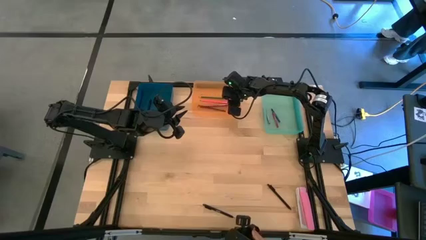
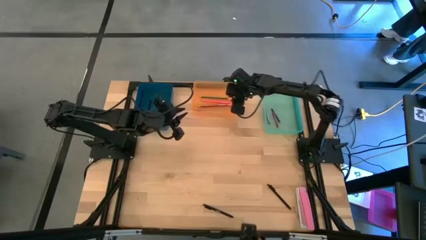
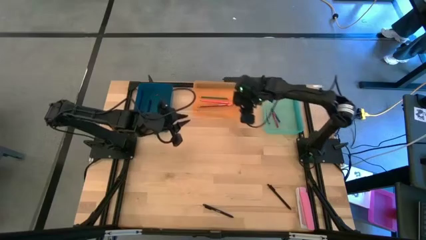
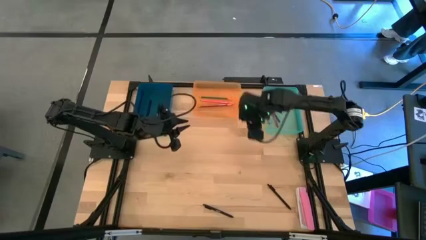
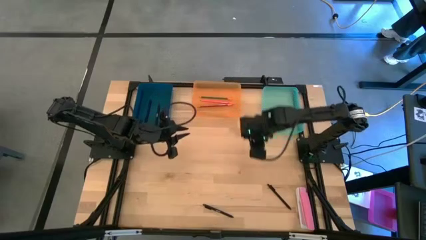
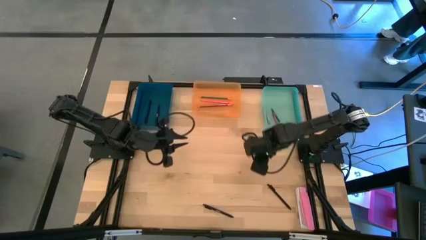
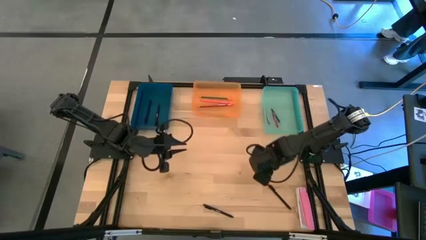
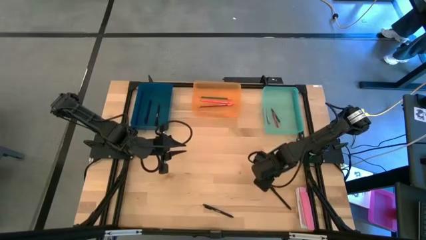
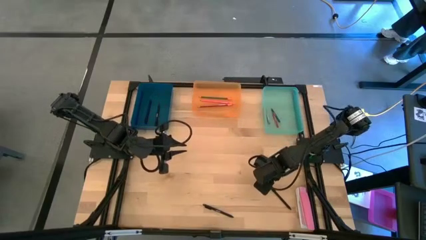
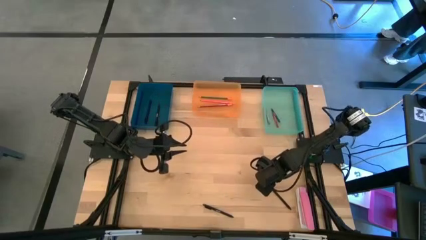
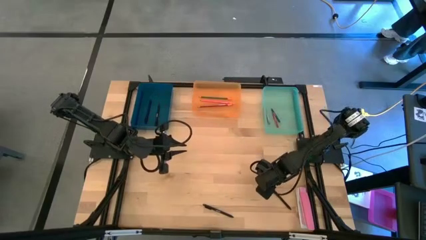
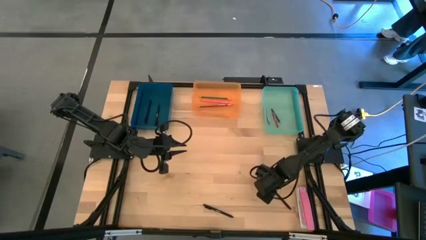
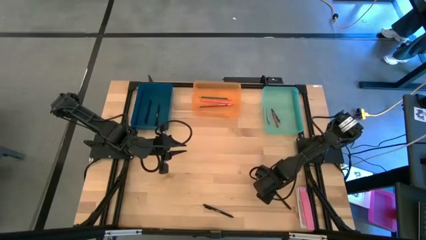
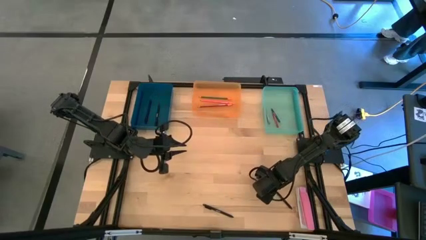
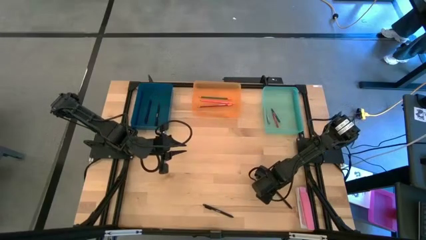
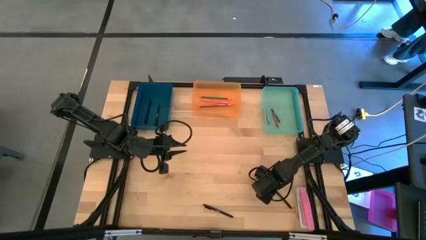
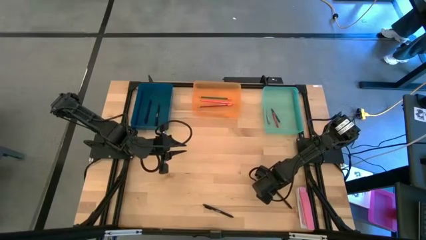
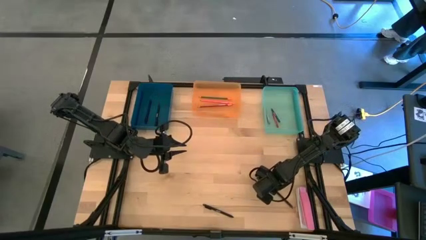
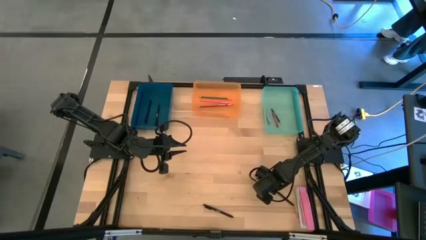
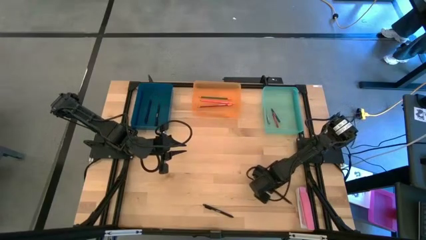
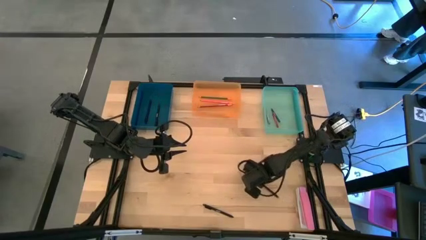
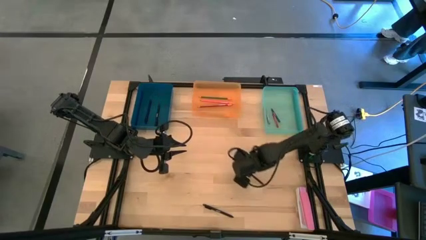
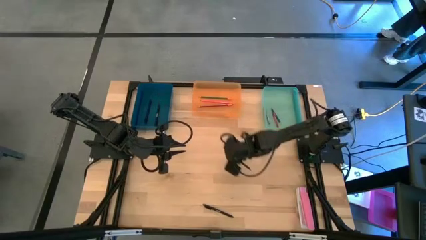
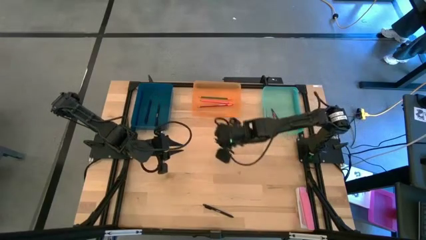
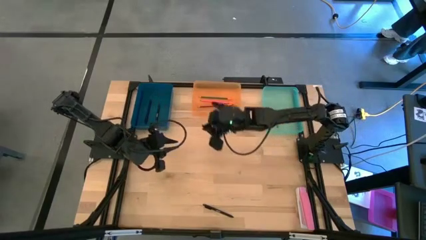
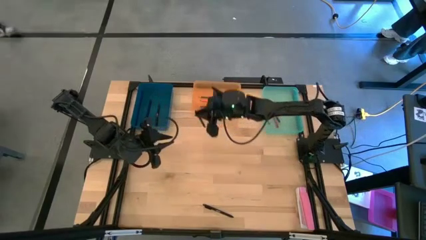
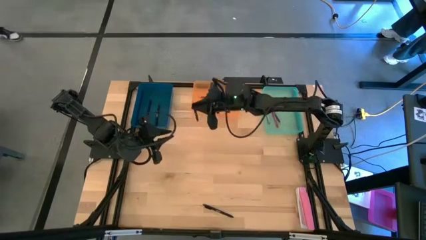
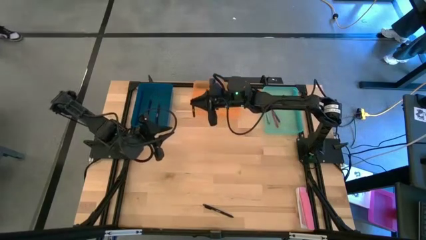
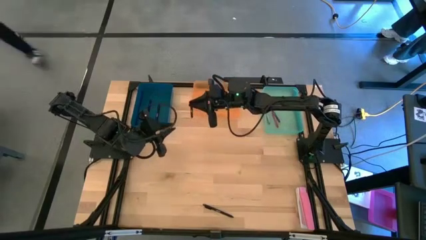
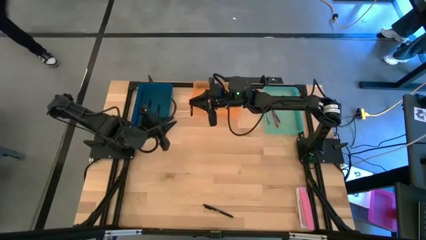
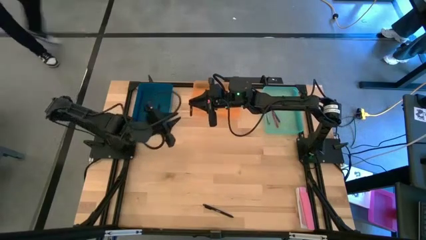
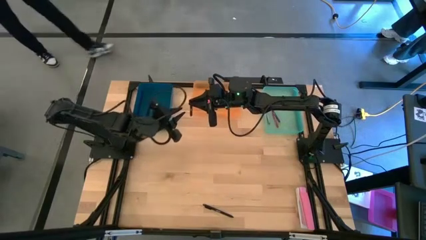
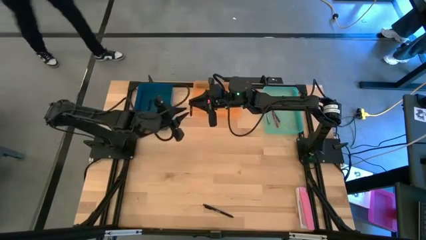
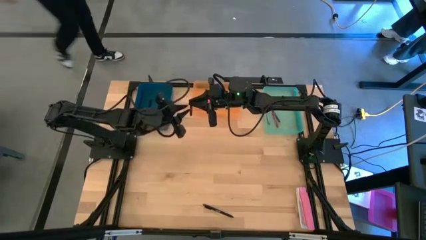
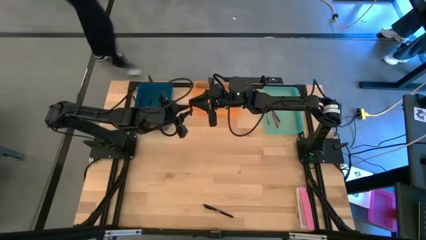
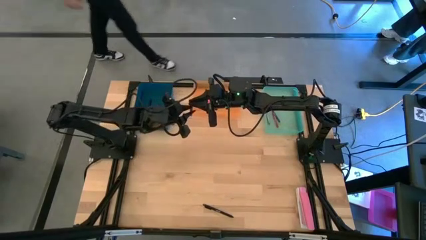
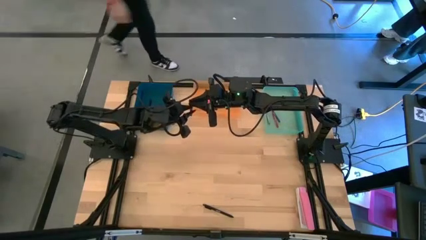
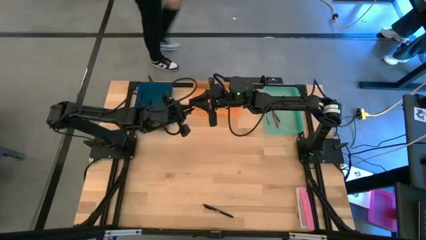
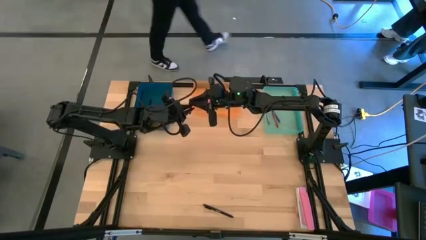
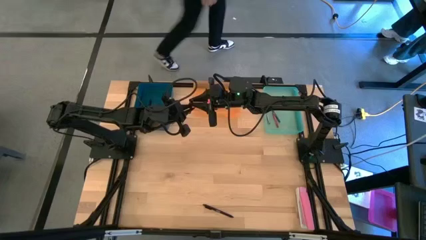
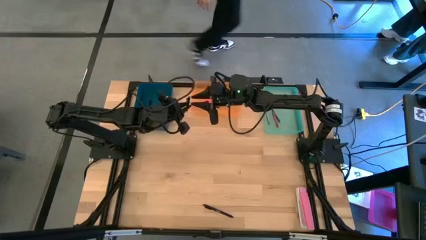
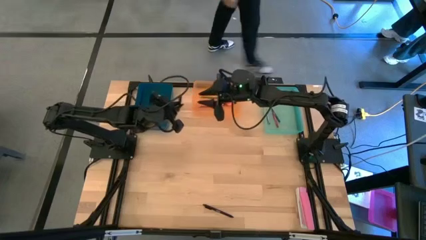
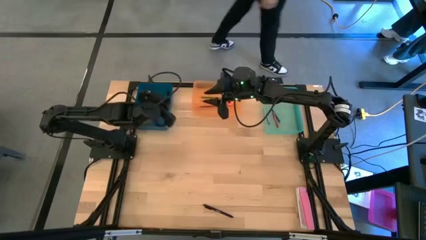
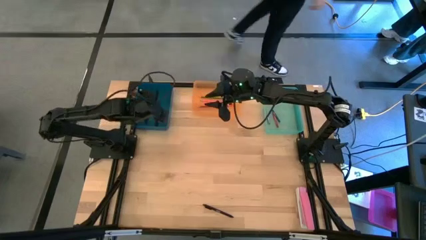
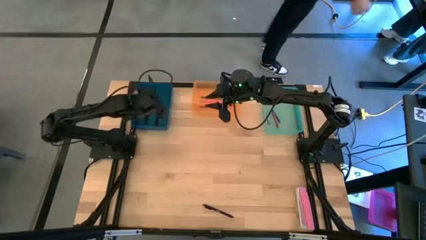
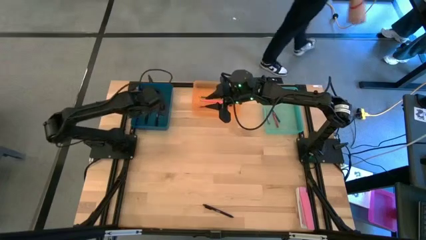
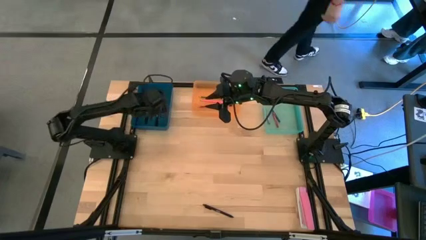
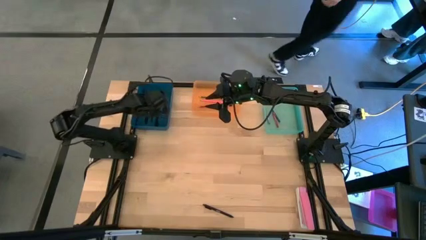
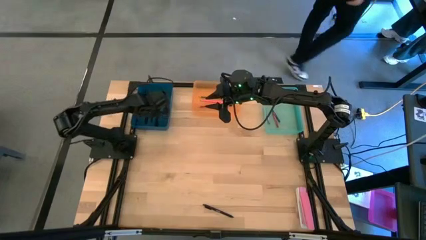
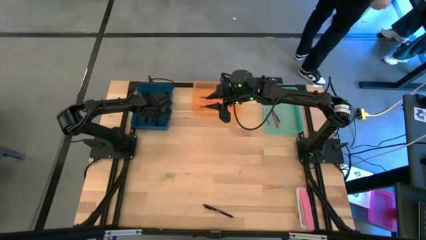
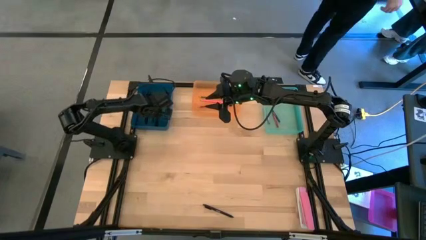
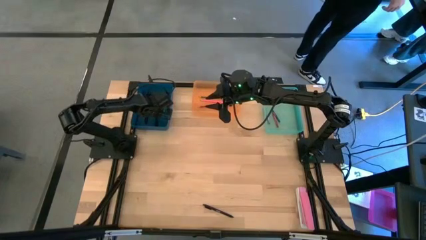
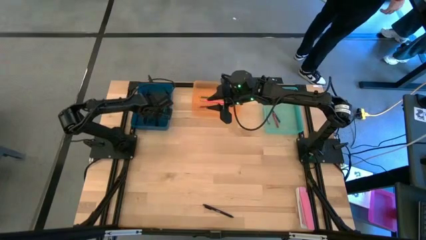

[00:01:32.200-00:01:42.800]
Task: Sort crayons/erasers/pens/pencils in bins
Put the black pen into the blue bin

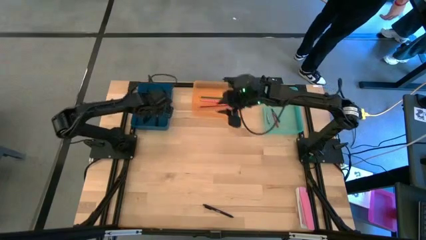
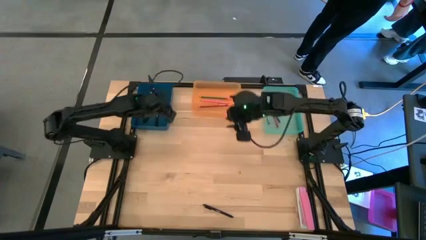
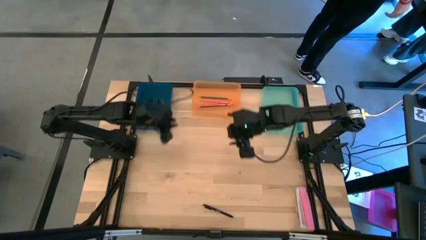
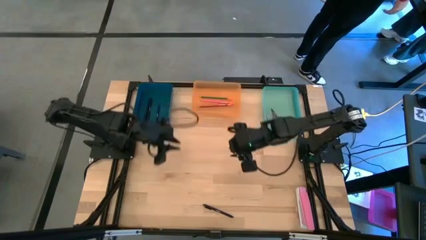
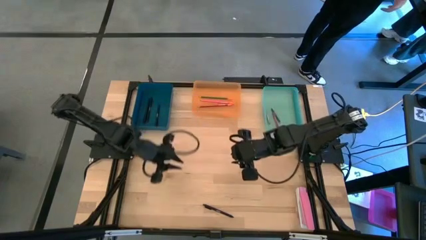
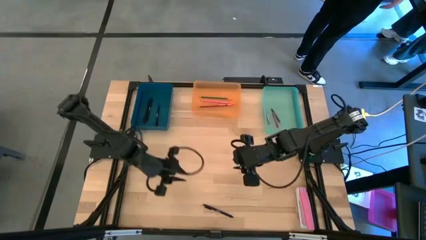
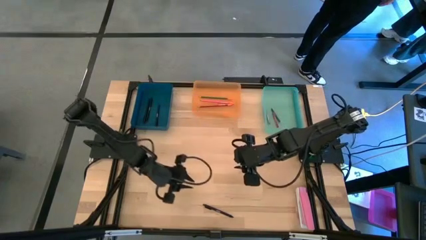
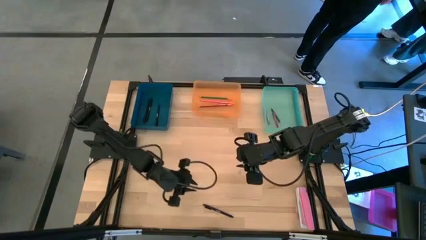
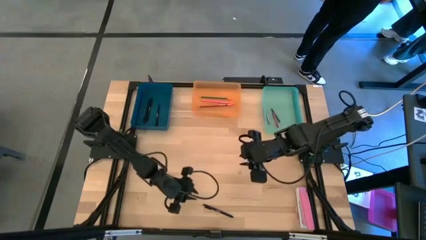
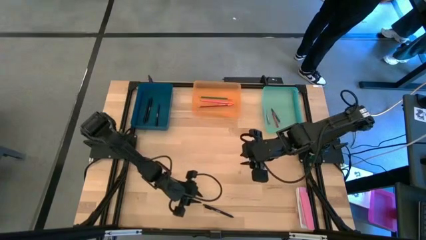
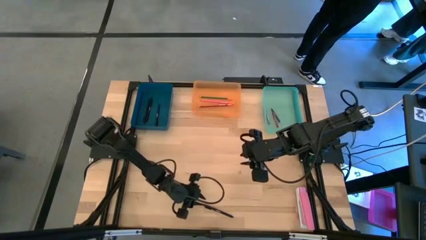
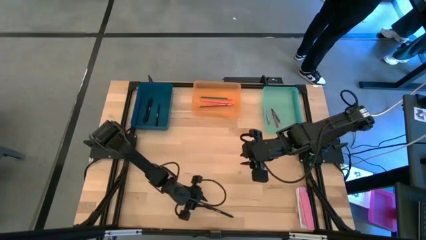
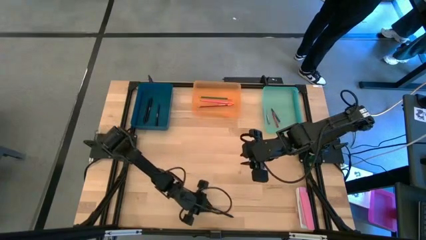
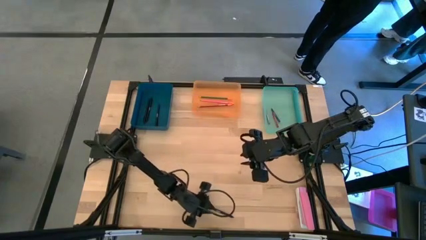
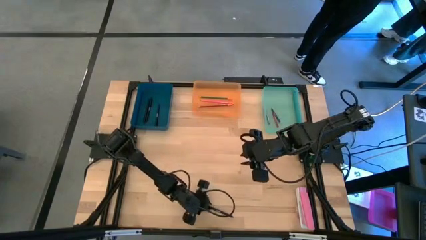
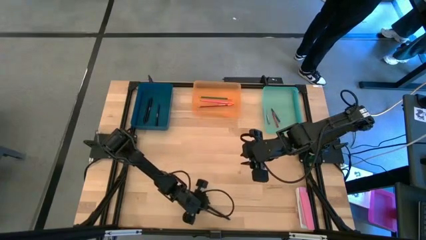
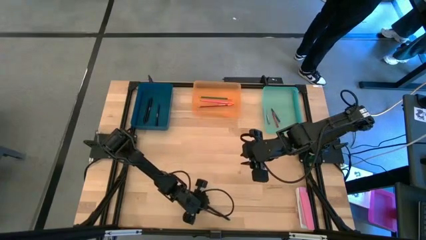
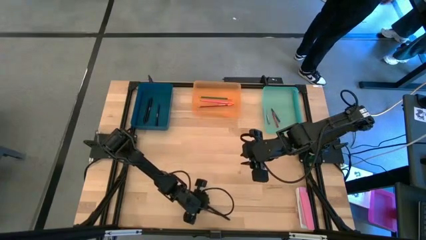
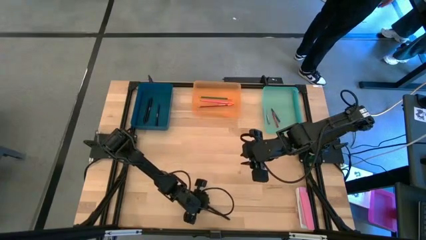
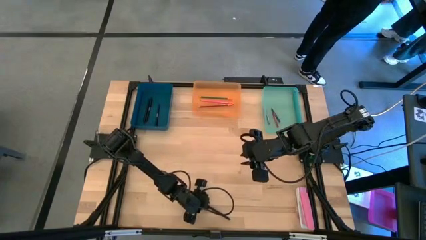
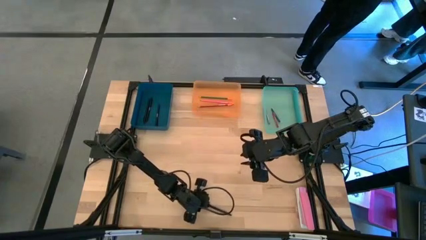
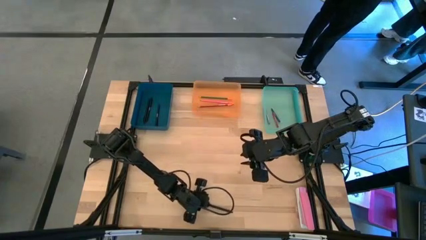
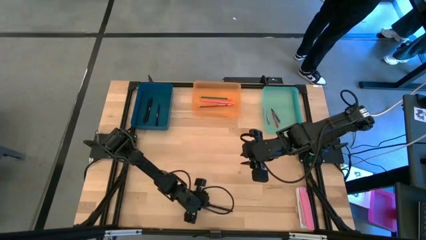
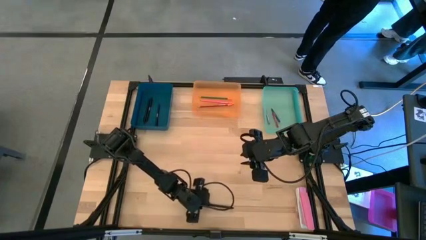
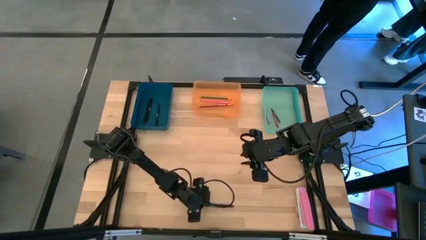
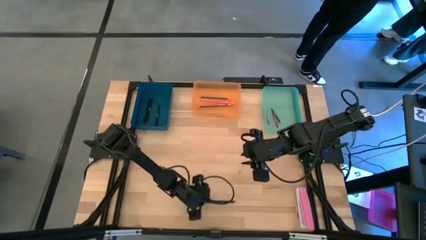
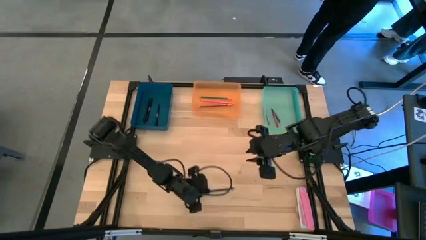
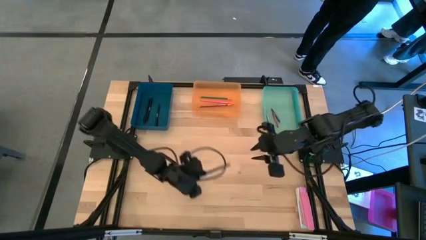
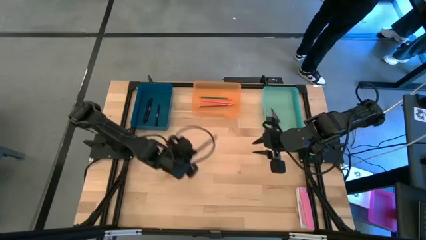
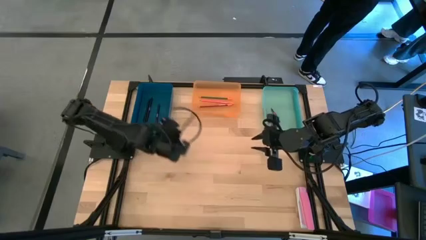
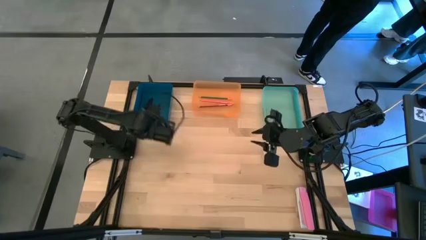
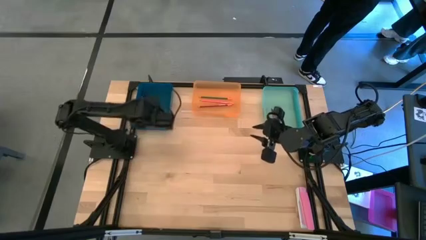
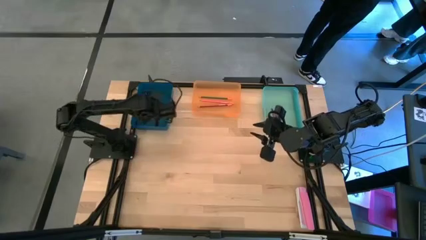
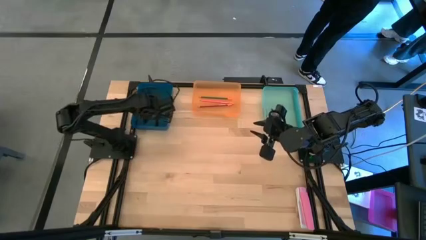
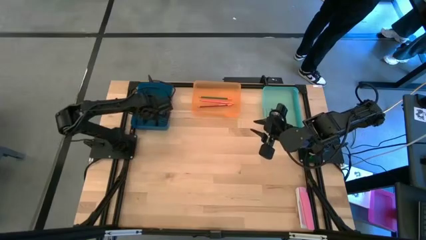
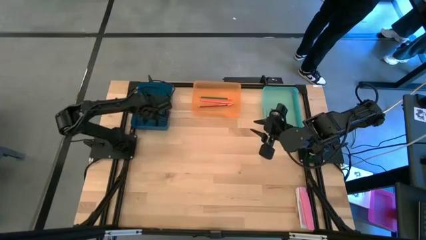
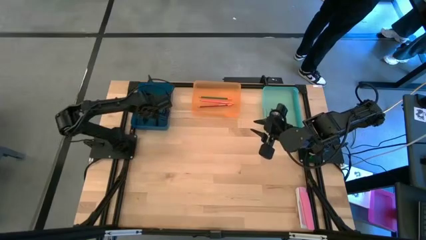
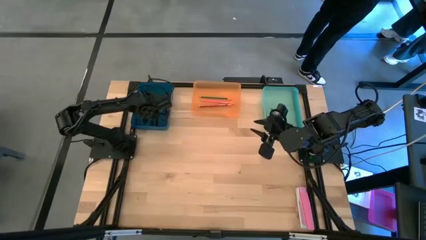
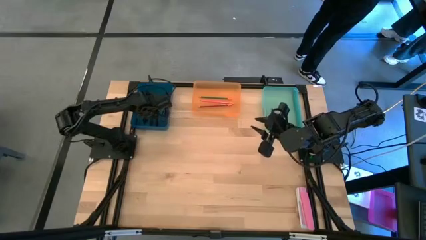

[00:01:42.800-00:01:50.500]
Put the black pen into the blue bin
